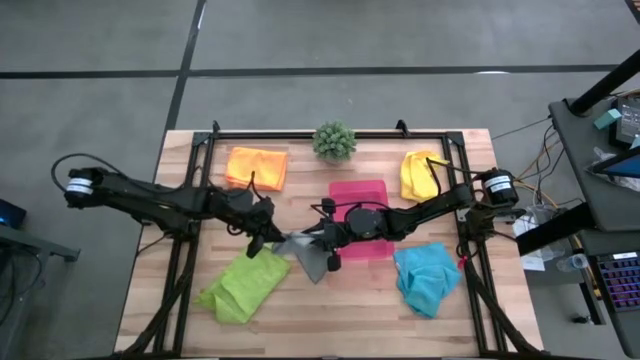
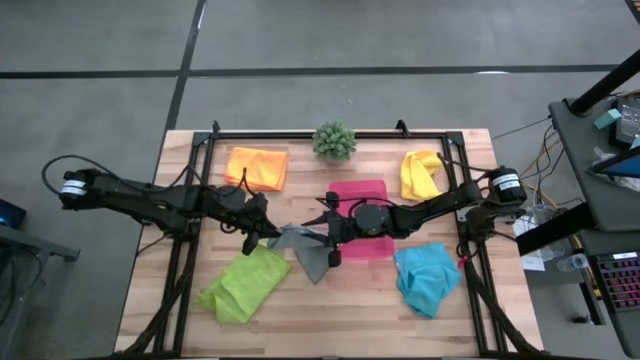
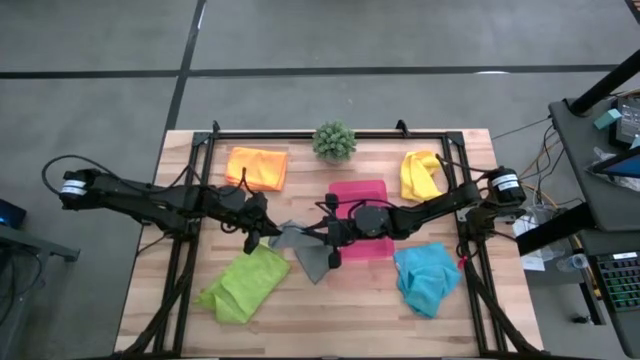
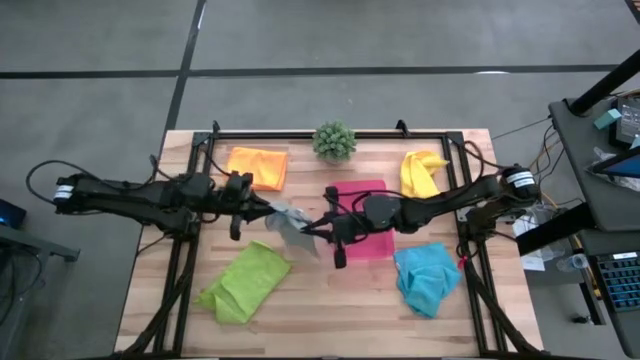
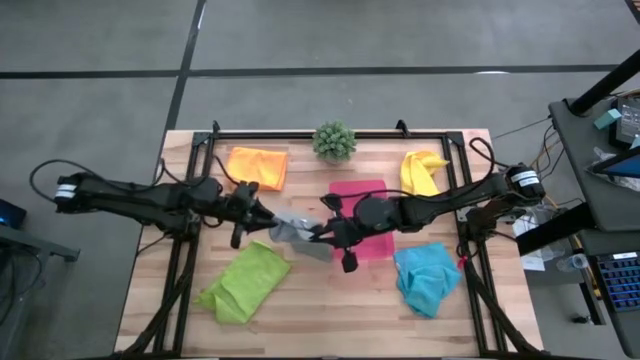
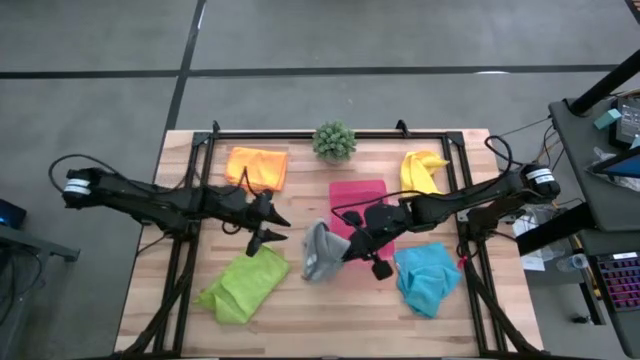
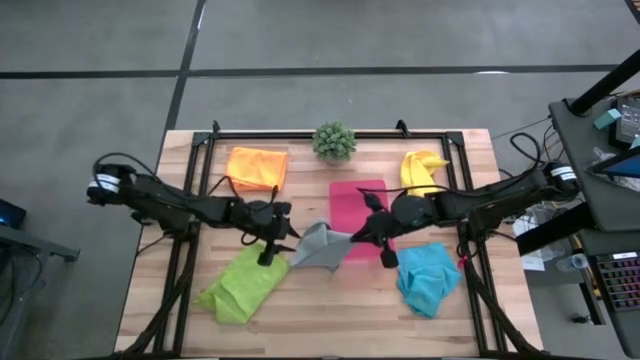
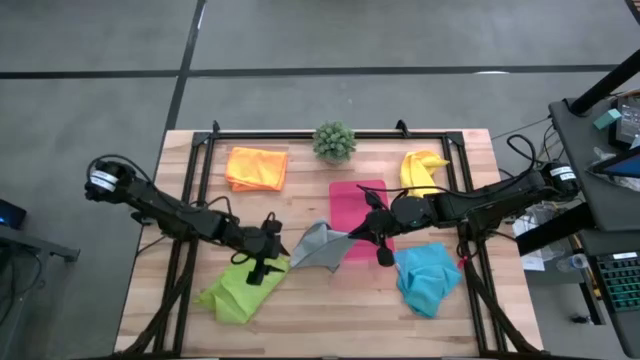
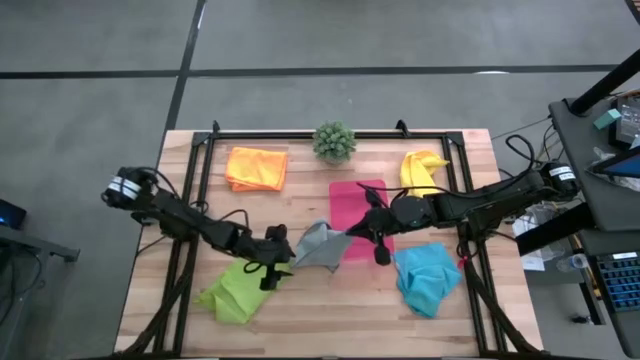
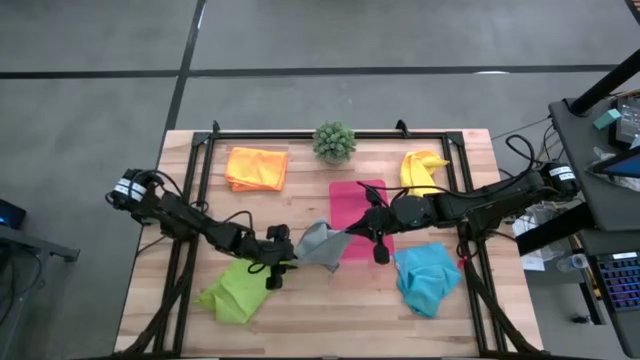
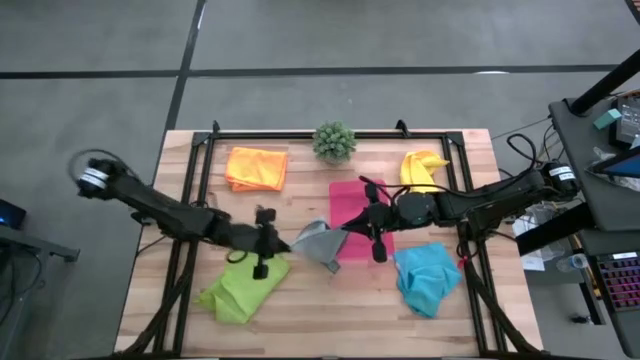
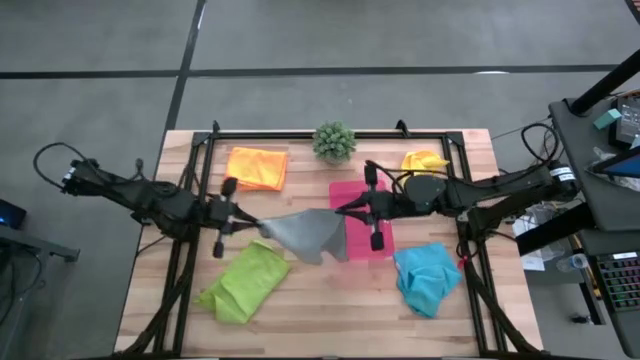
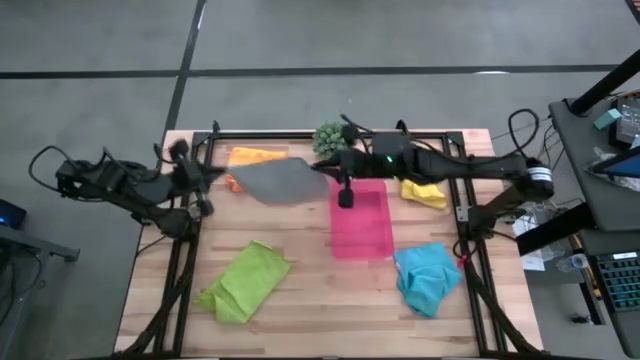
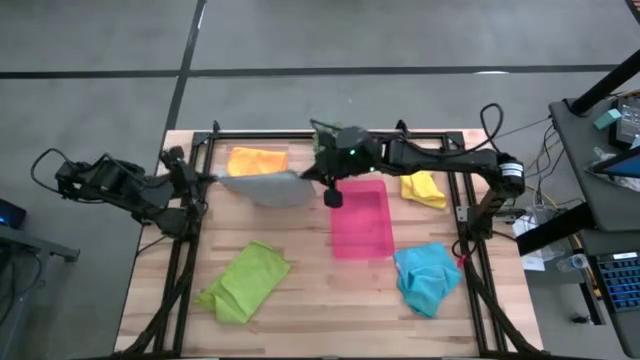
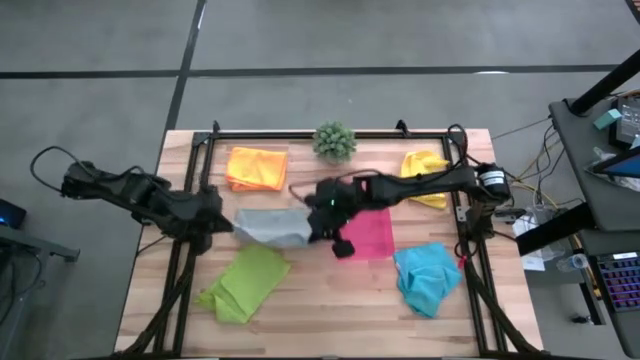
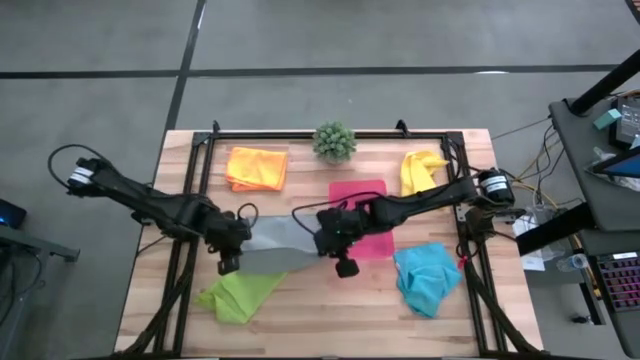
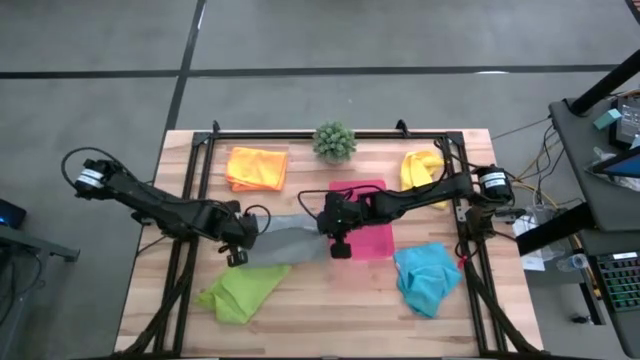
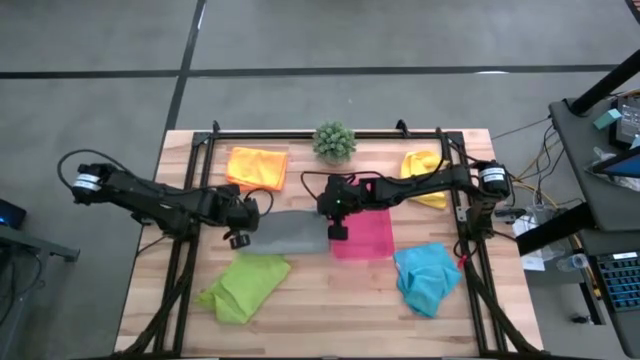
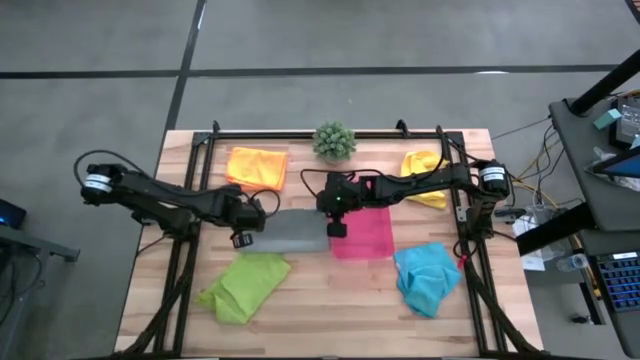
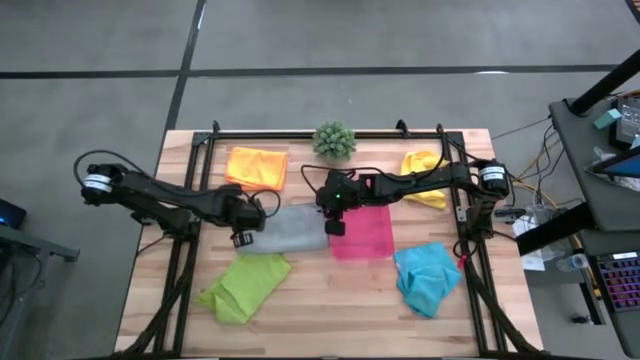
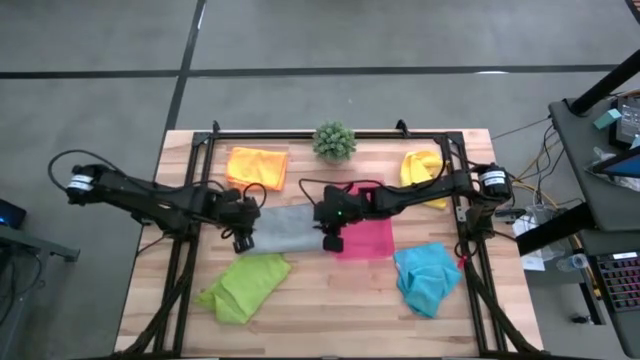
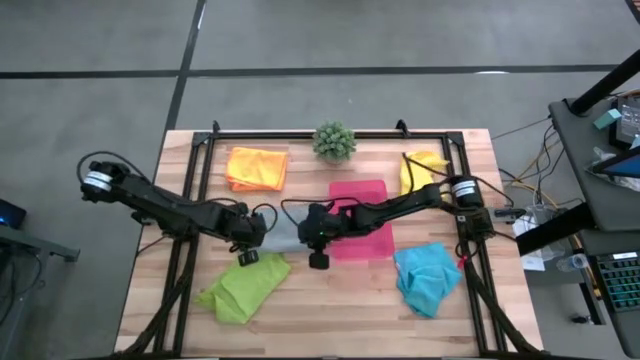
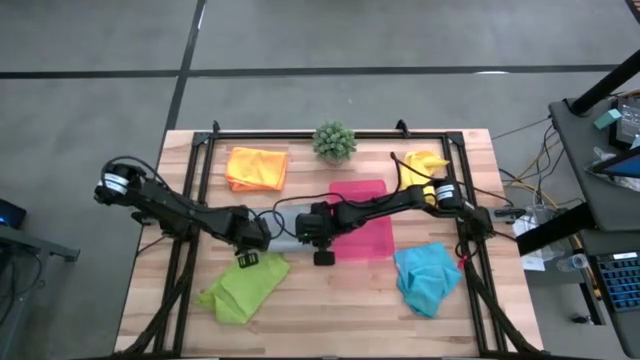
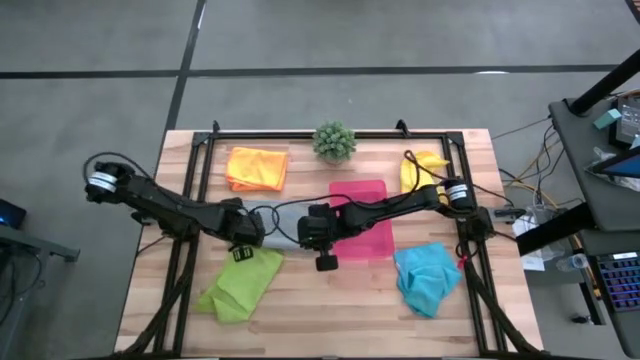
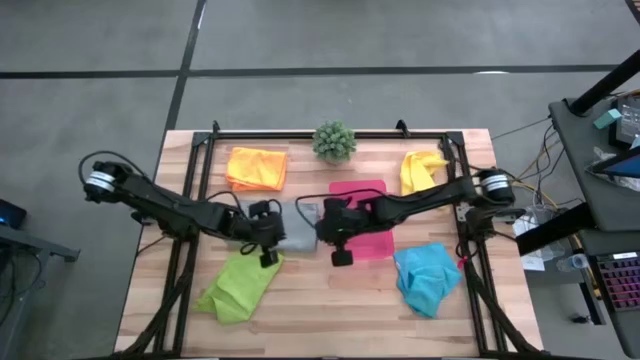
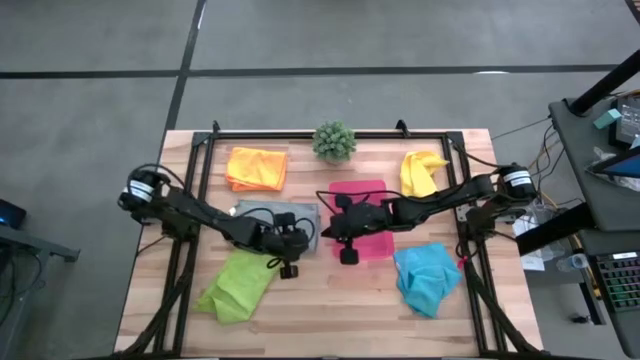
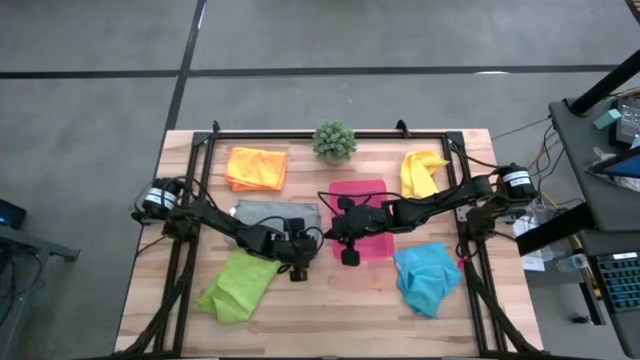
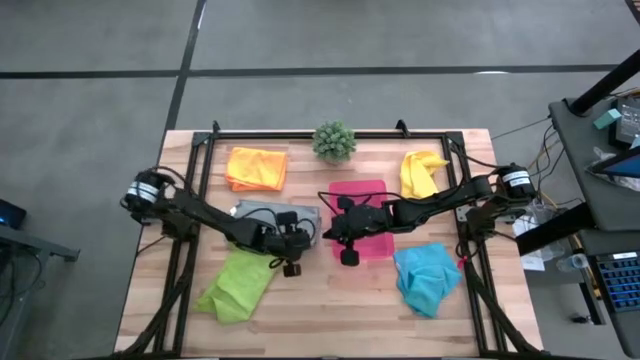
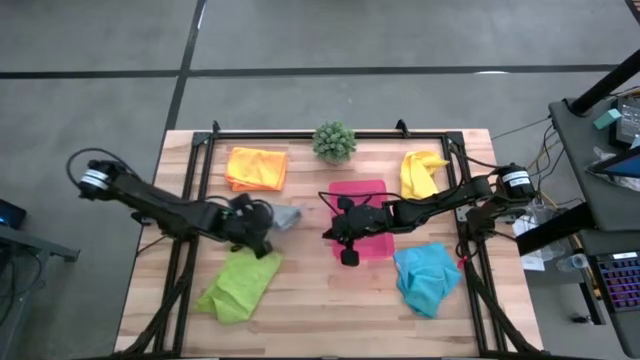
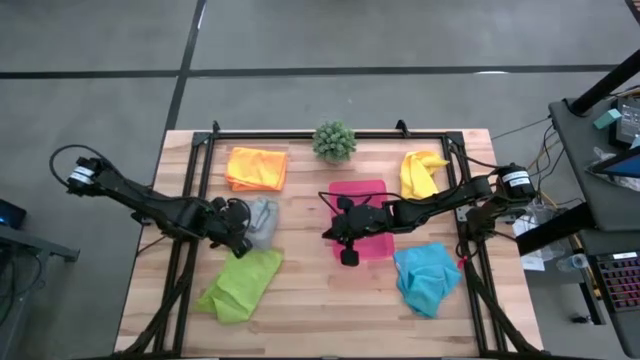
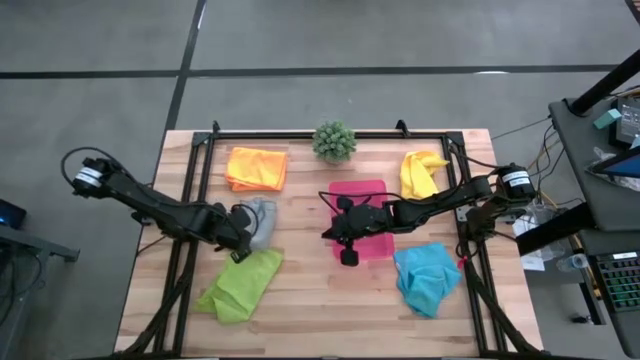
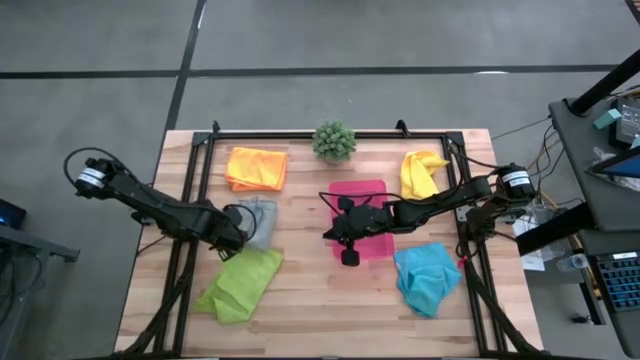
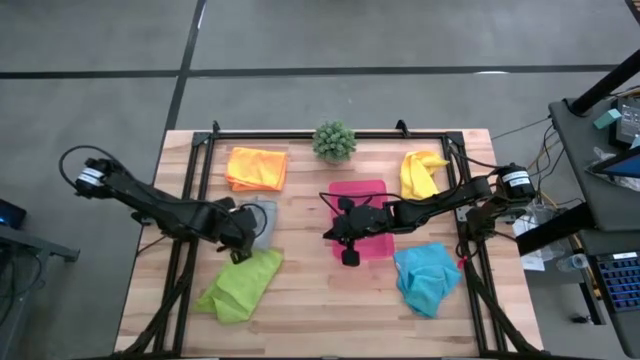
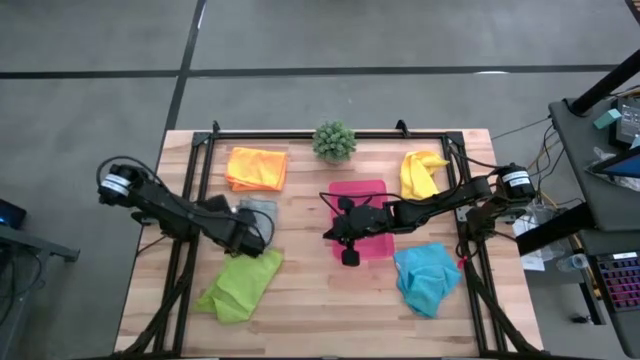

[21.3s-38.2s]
Task: Fold microfiber towels
Fold the gray towel

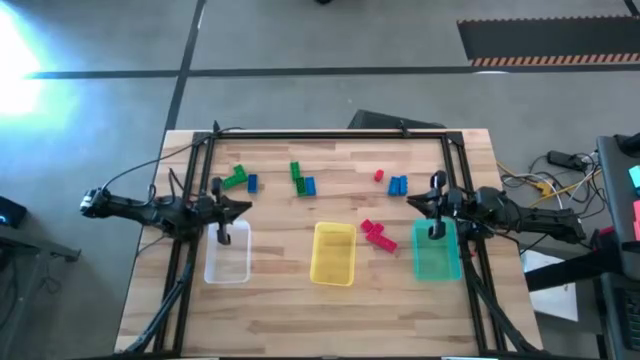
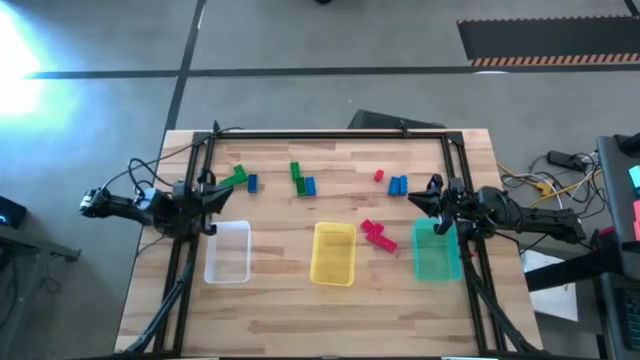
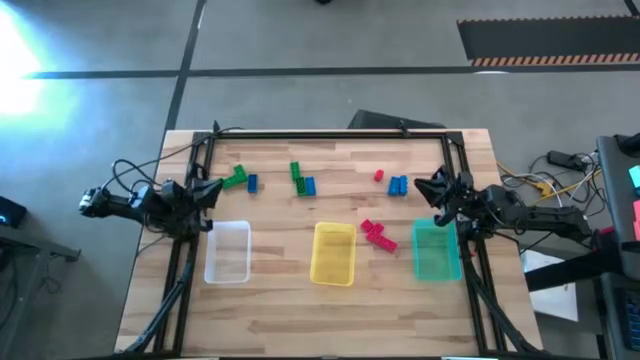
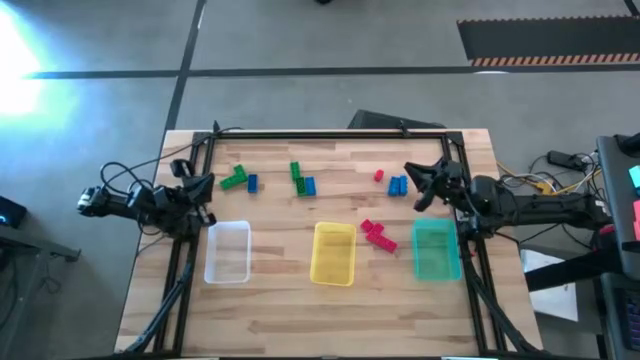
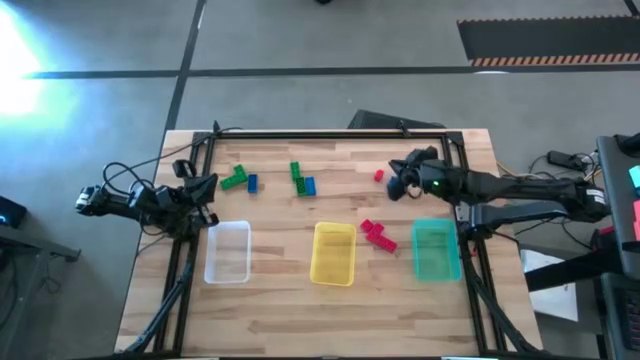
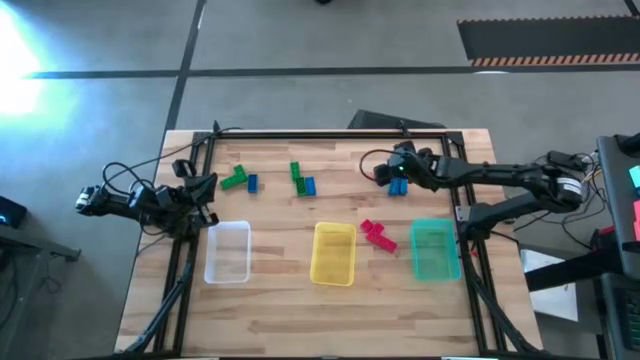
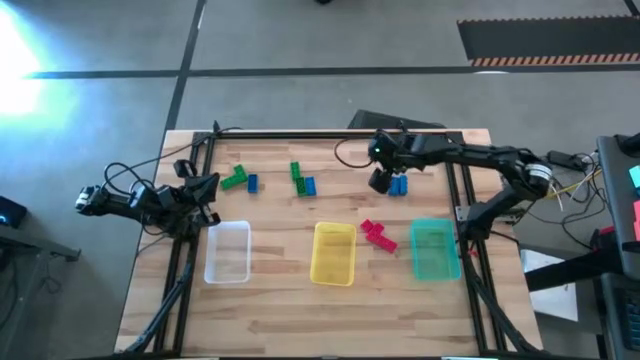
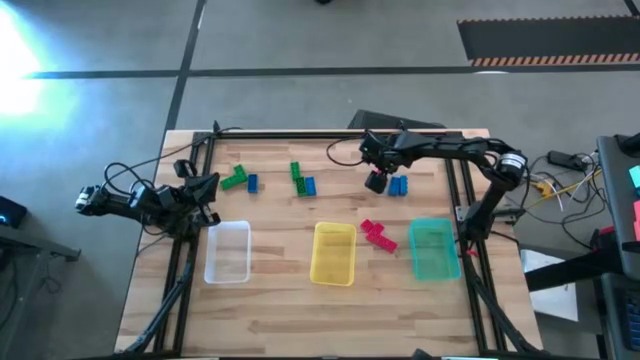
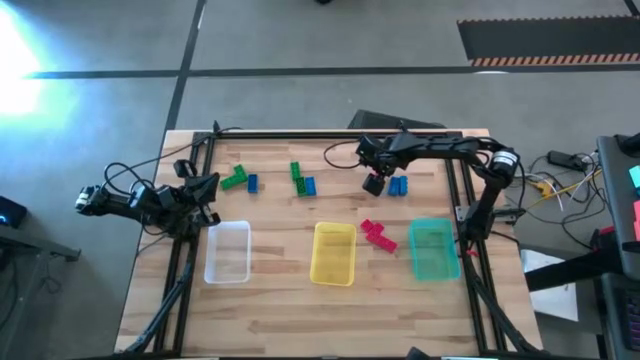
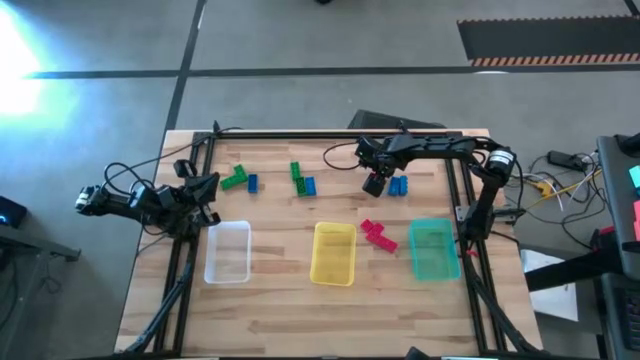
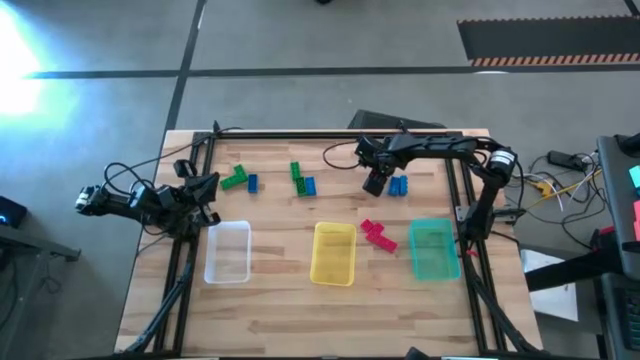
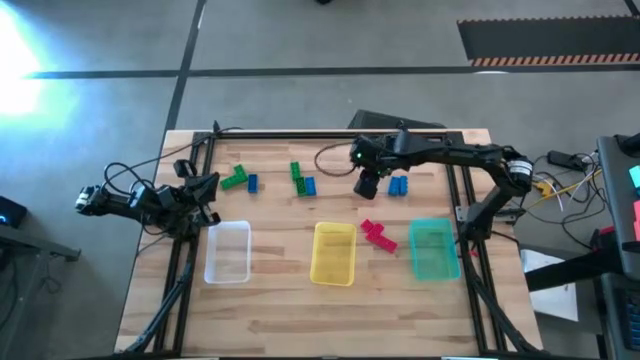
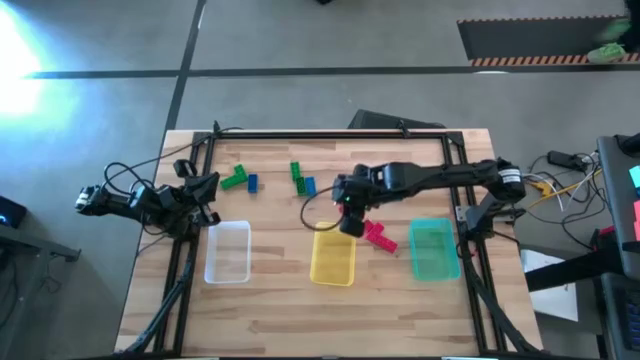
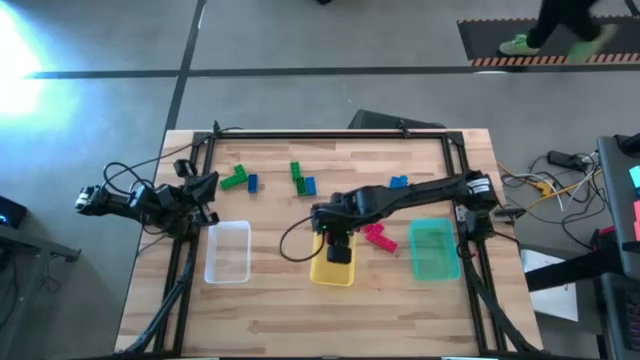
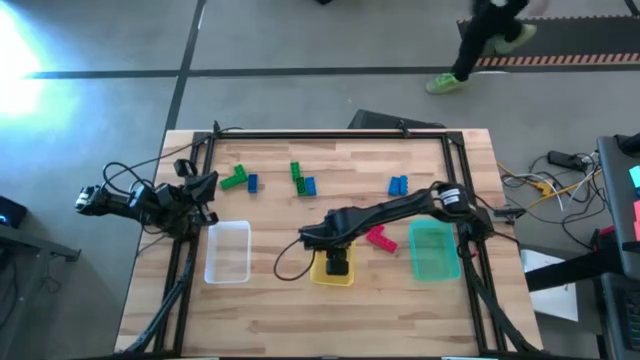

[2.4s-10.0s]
Task: Sort & place blocks by color
Put the red game piece into the yellow bin
